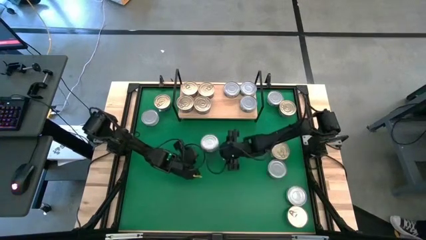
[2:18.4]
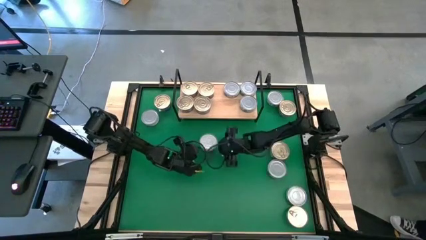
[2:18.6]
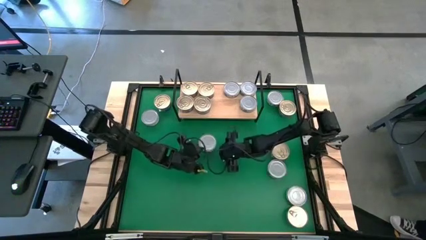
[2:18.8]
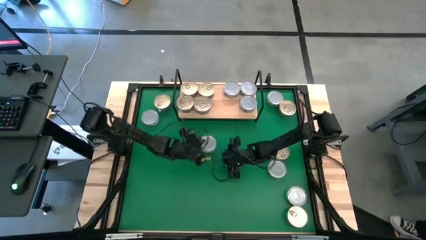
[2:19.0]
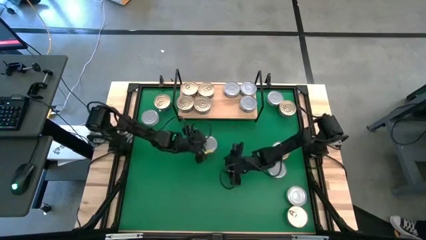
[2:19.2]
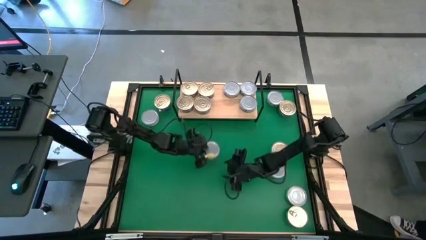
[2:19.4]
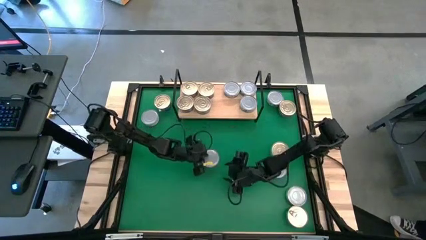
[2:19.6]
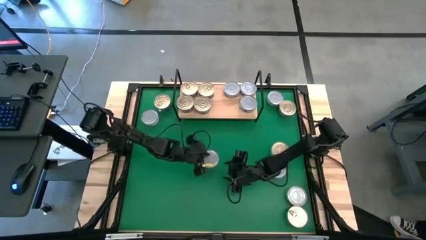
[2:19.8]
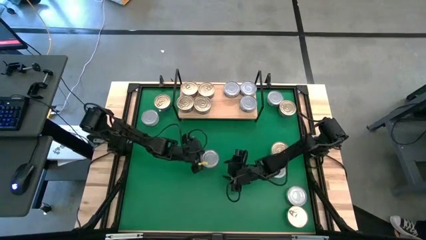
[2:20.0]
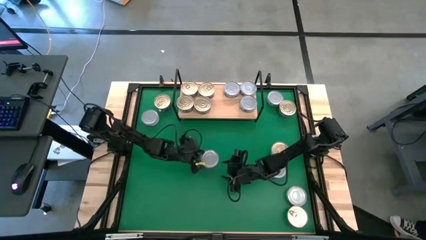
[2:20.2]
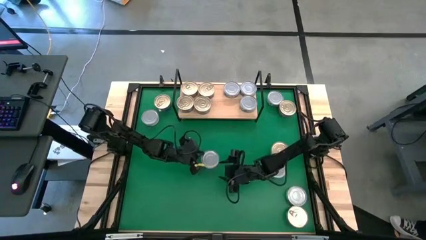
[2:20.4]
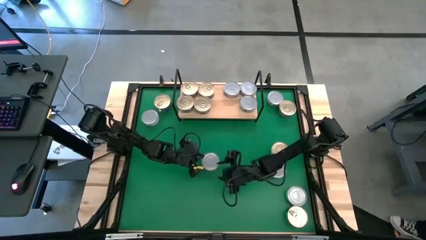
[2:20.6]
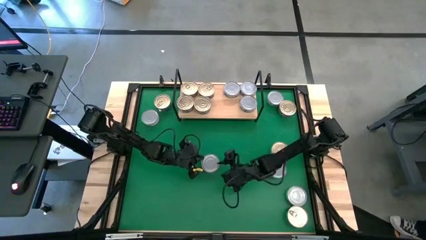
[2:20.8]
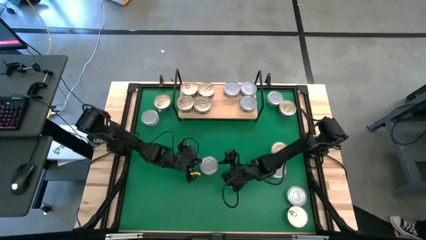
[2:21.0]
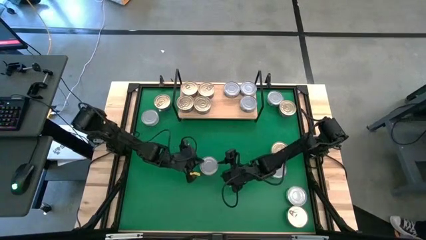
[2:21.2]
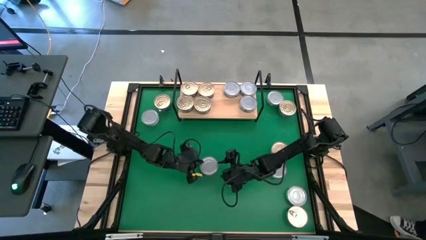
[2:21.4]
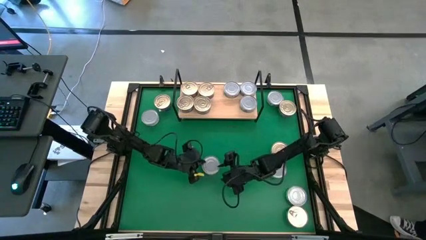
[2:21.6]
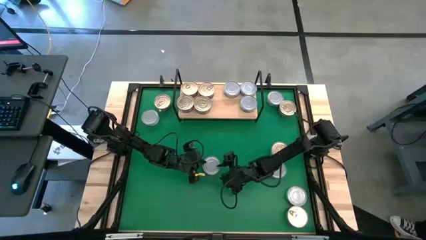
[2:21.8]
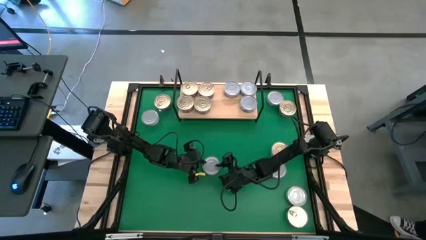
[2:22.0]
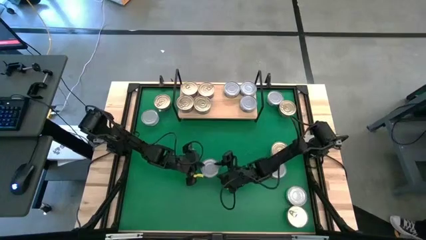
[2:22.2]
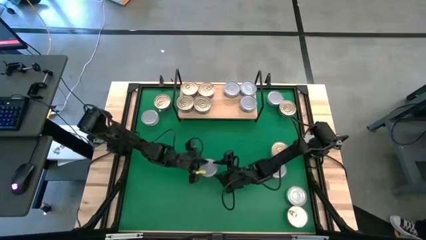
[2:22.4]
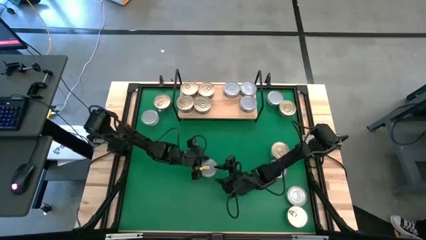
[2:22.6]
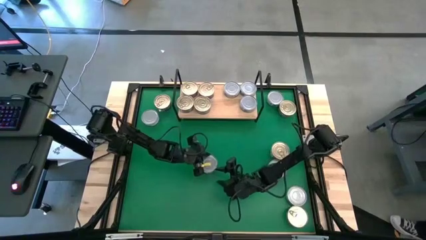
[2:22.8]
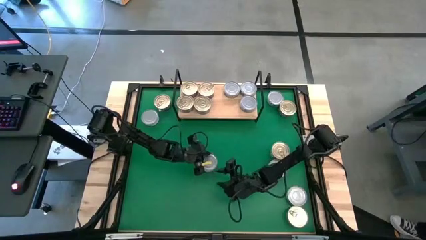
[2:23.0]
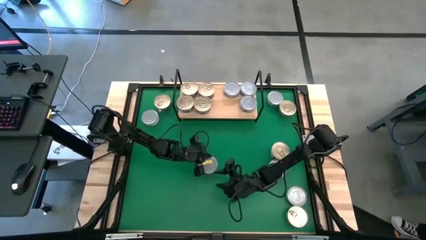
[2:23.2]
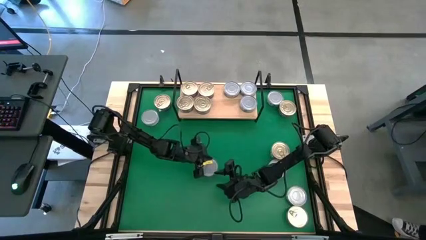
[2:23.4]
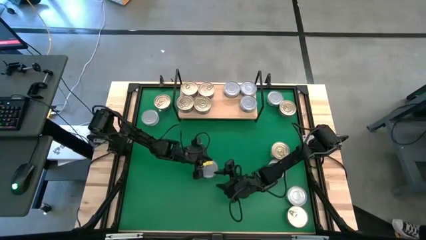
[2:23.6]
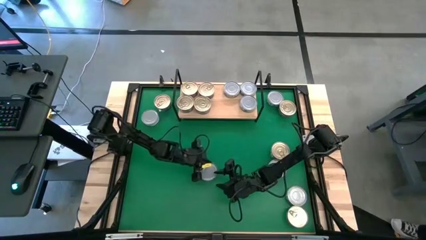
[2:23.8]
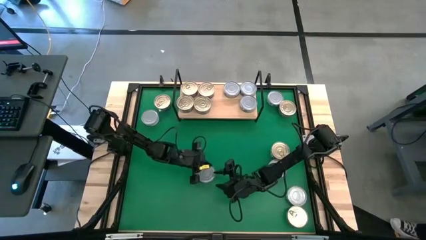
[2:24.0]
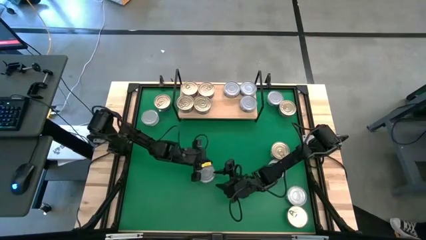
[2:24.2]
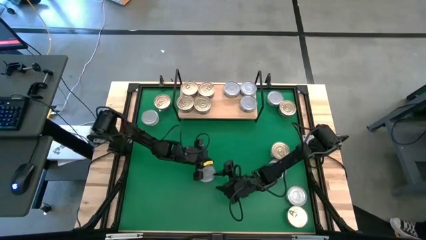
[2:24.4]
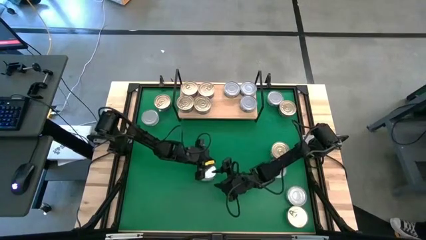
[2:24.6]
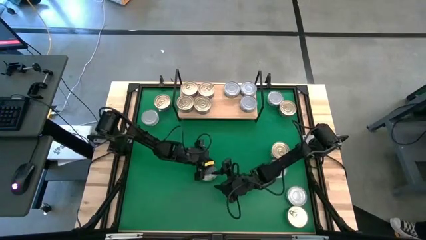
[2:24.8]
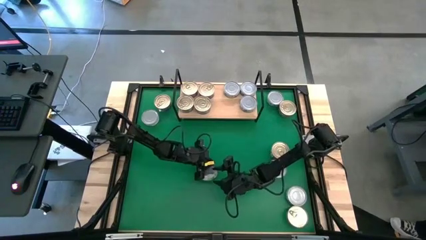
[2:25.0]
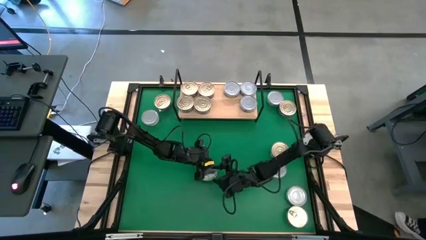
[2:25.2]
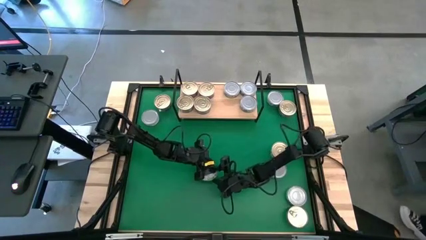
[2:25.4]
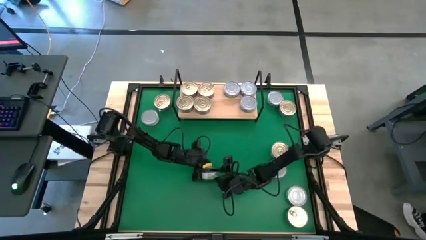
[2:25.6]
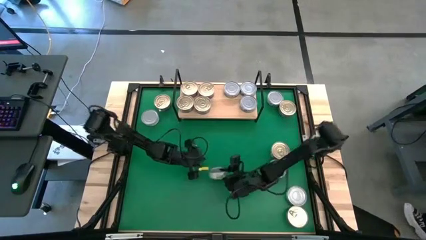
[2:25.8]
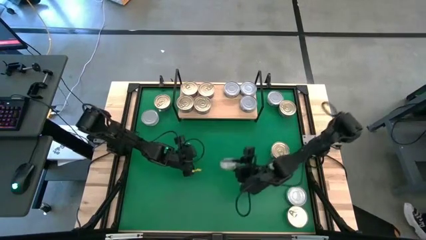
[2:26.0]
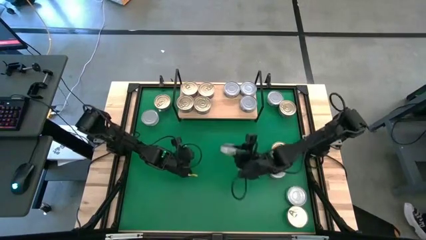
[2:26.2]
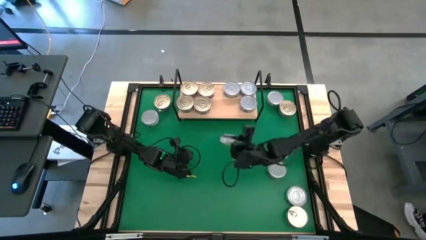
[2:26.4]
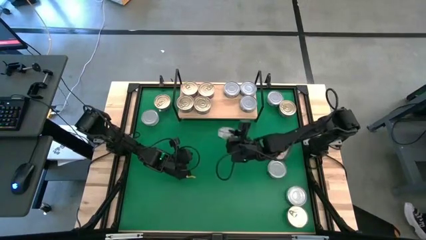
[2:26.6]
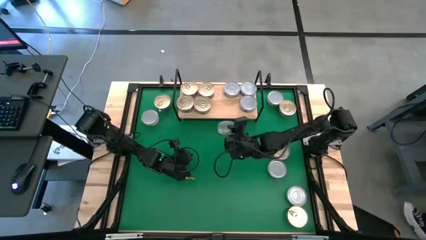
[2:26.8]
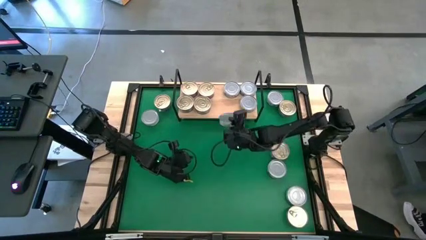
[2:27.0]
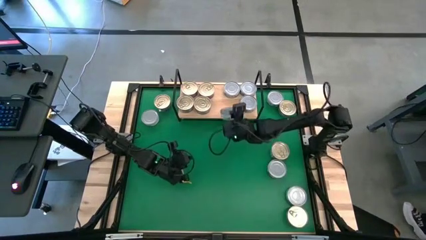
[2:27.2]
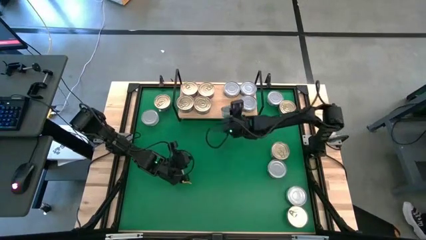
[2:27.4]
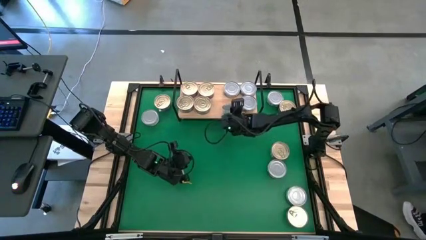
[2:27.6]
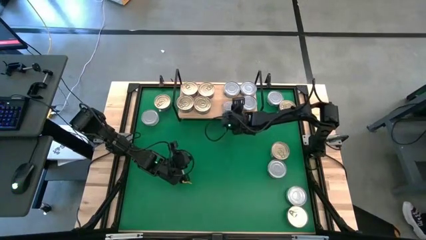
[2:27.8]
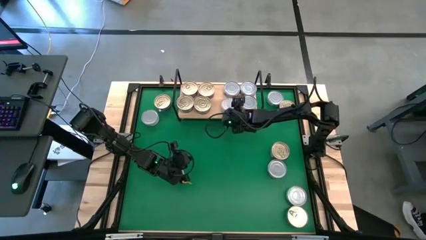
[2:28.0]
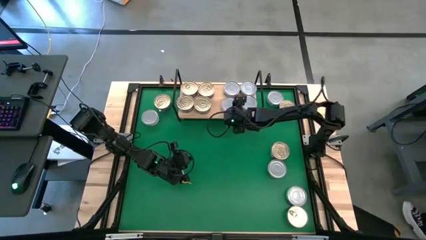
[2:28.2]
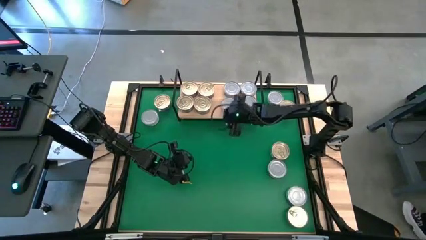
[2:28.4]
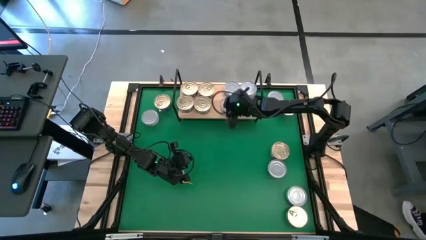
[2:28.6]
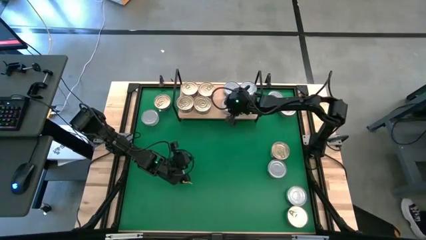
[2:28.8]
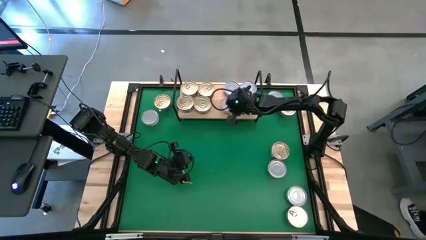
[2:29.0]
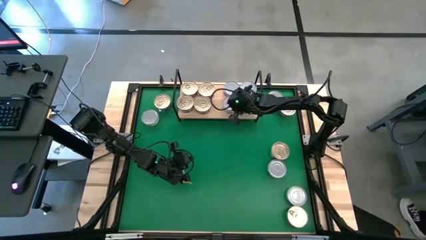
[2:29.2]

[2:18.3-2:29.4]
Task: Stack canned seafood by type on shelf
Put the green white tuna can on the shelf

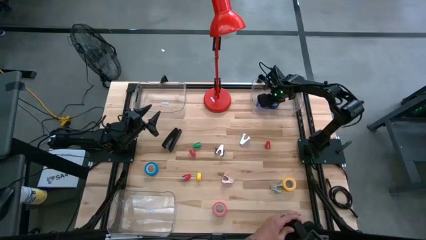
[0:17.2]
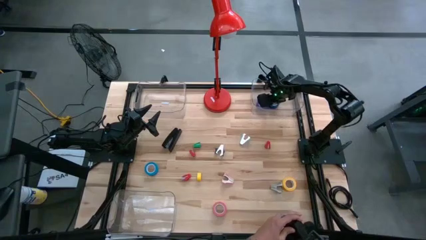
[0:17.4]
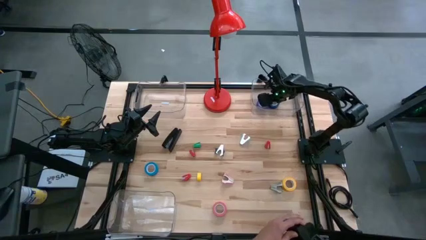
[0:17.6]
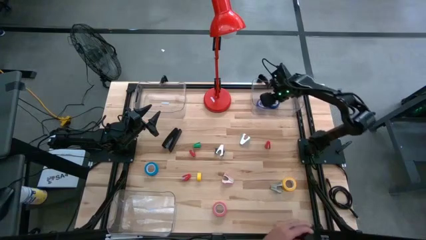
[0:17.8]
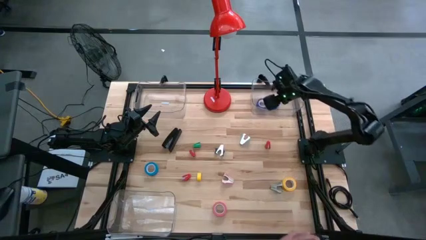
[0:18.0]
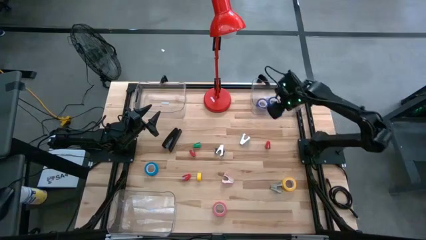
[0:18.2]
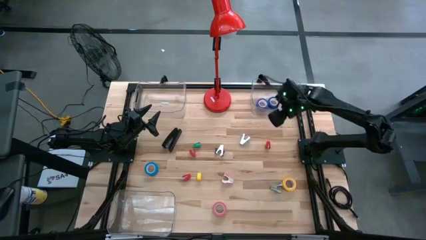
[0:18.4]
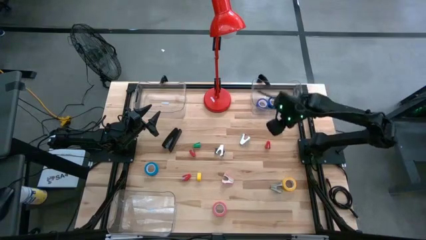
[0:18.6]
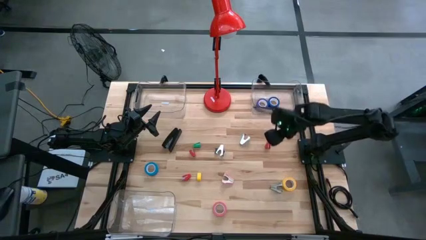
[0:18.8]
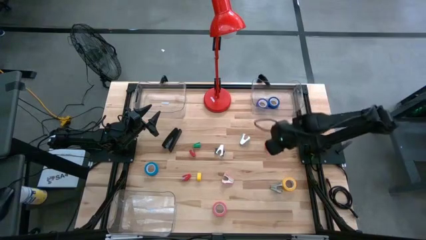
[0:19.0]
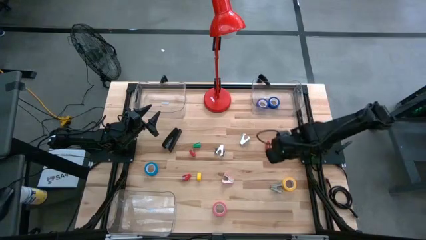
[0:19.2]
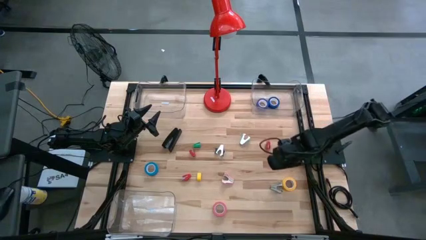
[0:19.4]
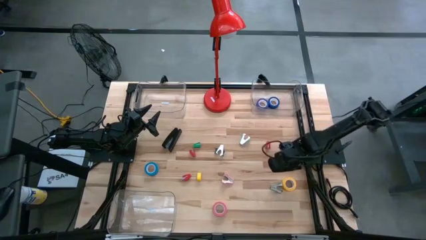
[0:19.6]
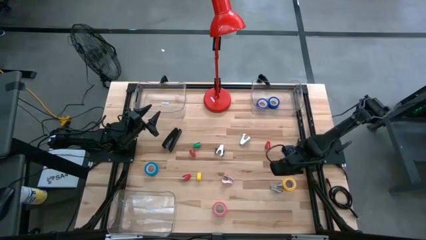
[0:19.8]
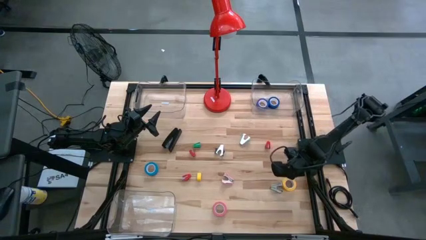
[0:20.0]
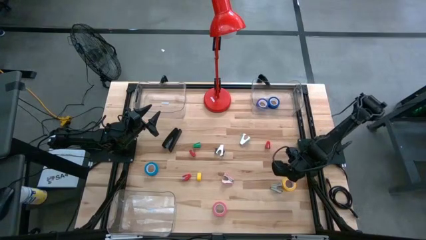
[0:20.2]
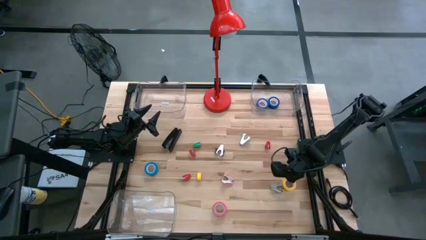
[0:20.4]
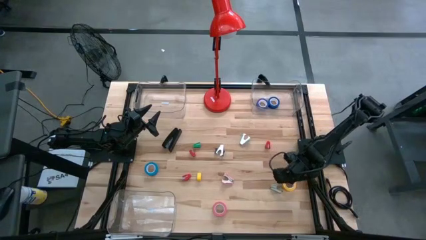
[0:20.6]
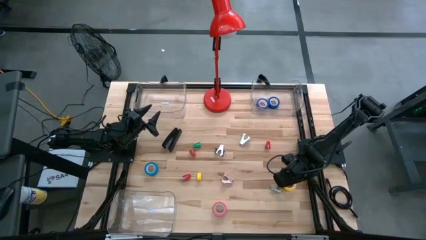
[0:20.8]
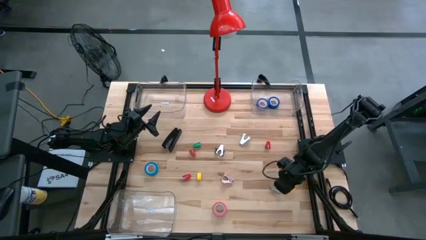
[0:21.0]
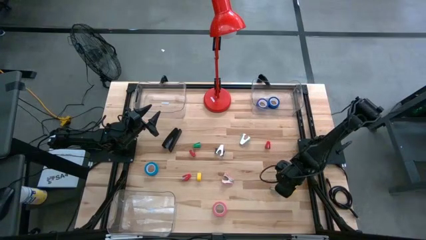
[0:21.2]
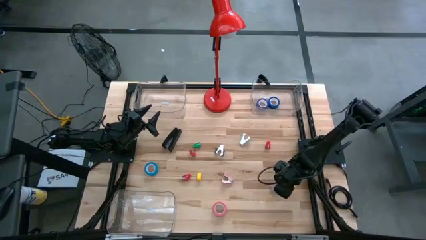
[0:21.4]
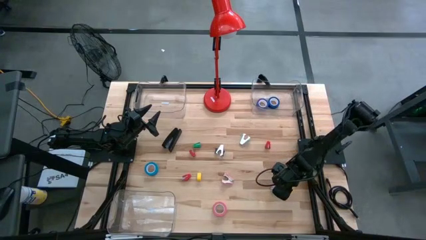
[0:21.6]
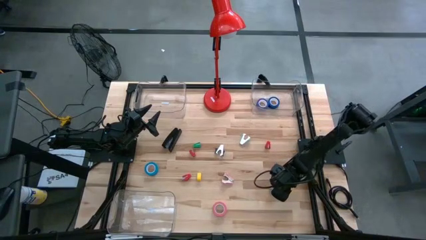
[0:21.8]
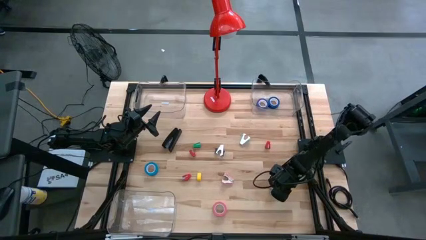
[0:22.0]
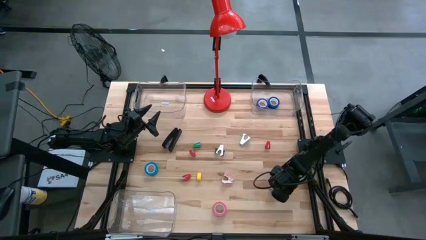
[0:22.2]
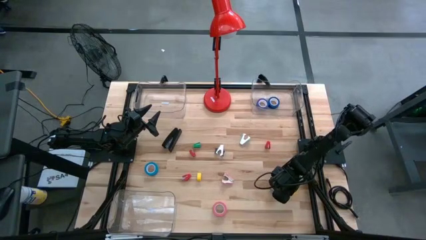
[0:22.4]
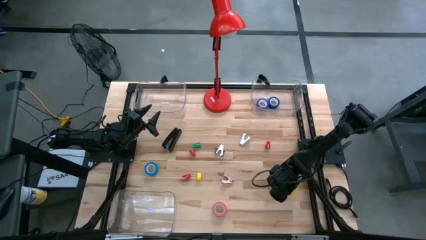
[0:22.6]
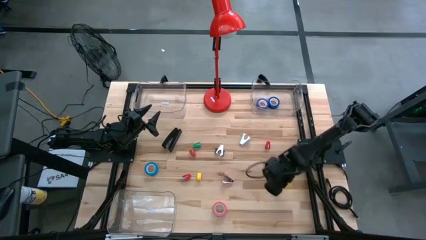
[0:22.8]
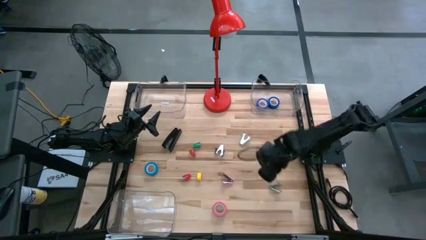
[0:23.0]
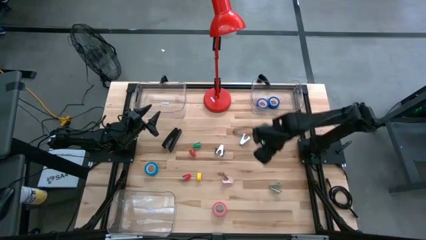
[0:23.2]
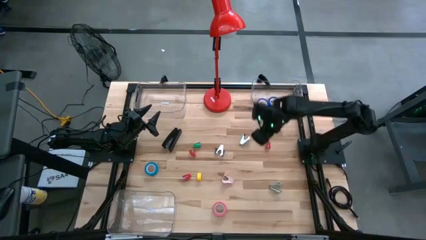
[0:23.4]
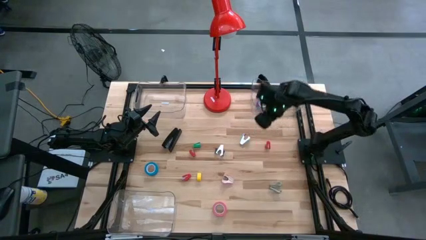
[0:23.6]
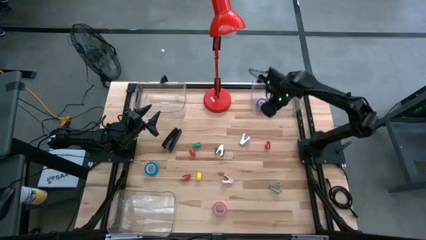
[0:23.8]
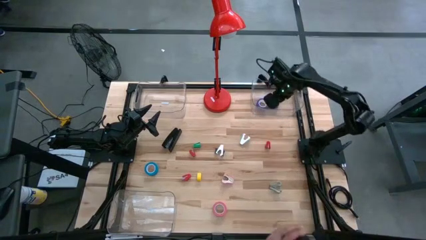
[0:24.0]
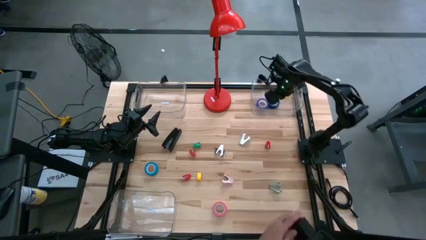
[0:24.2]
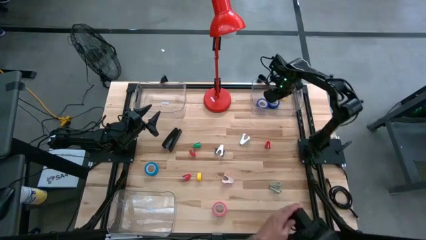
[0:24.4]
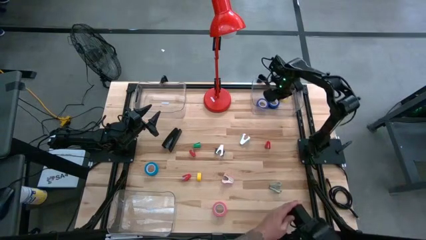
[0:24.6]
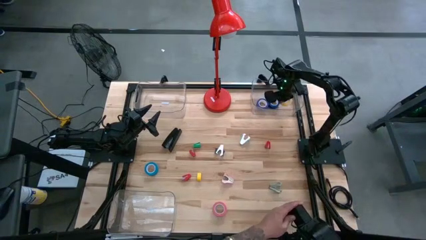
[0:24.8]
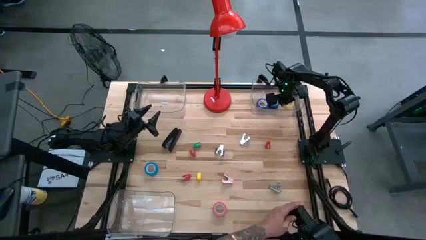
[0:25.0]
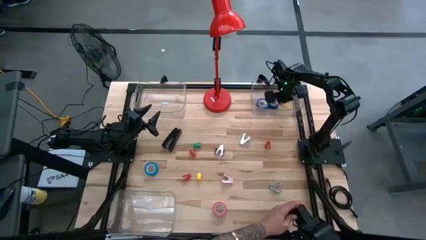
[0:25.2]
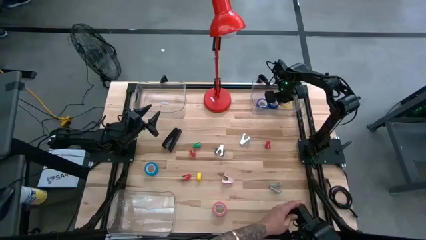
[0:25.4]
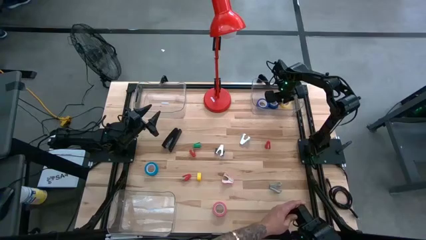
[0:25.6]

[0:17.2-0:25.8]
Task: Pick and place Stapler, Stapler remover, tape
Put the yellow tape into the top right transparent bin
